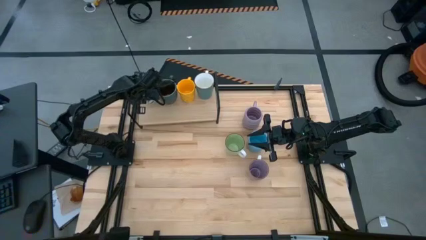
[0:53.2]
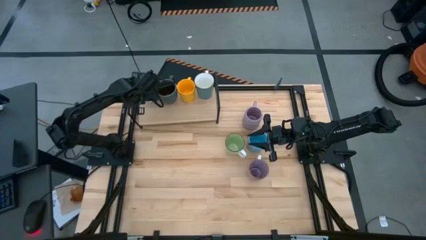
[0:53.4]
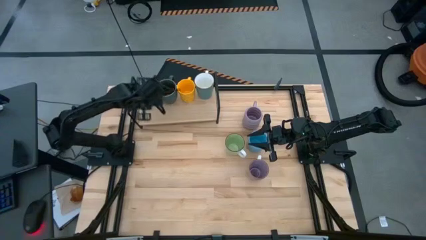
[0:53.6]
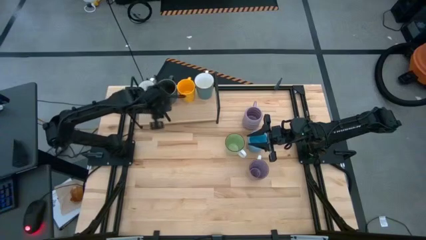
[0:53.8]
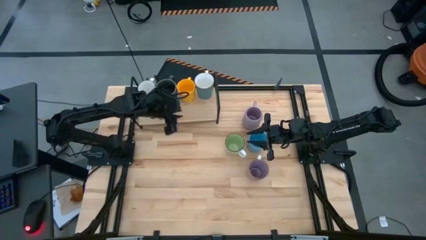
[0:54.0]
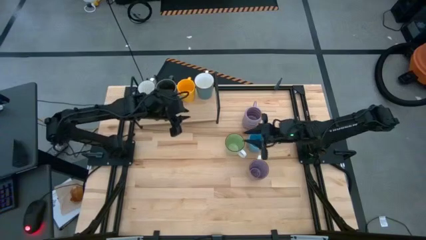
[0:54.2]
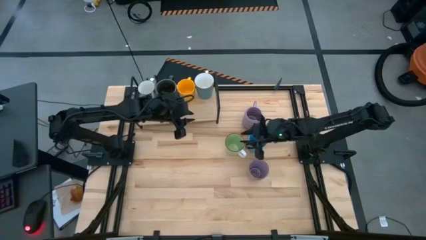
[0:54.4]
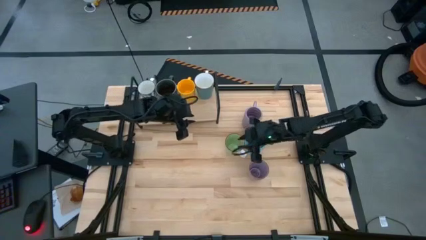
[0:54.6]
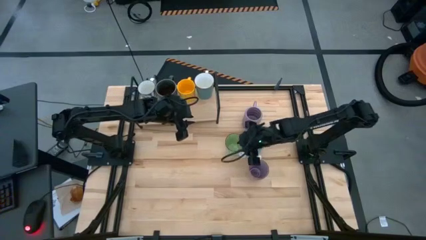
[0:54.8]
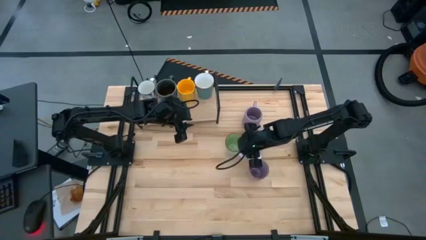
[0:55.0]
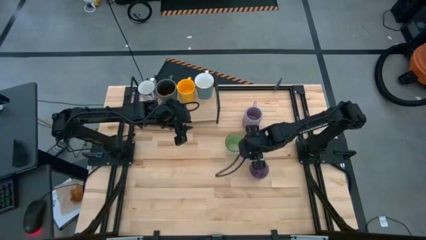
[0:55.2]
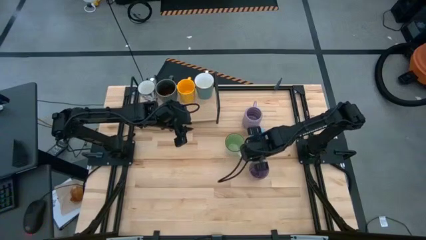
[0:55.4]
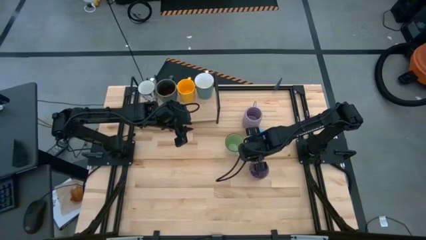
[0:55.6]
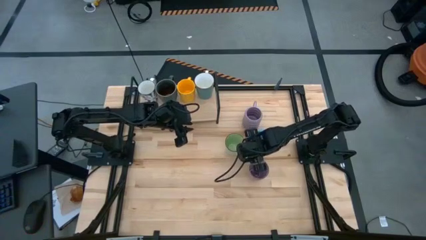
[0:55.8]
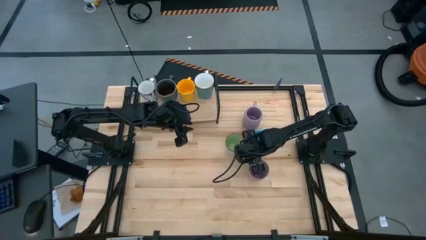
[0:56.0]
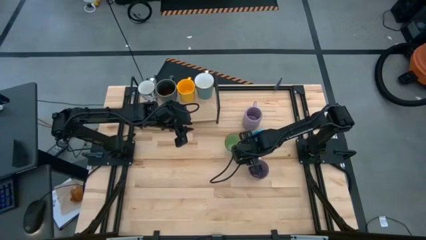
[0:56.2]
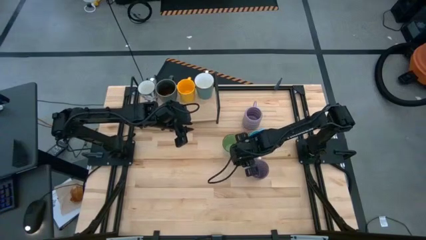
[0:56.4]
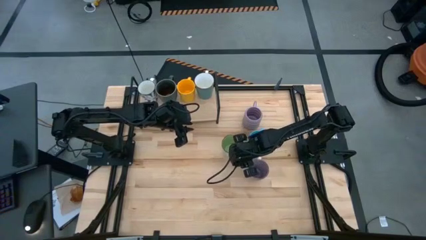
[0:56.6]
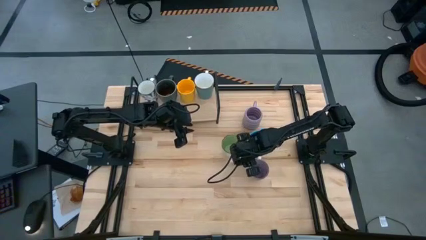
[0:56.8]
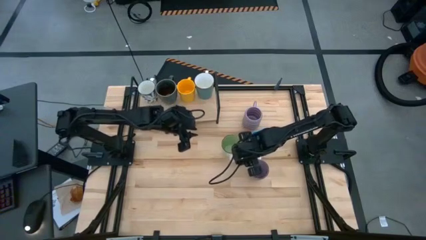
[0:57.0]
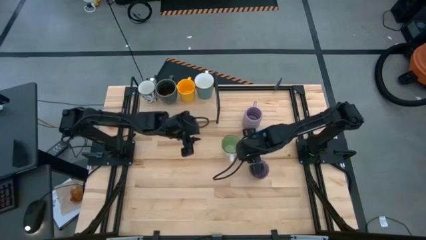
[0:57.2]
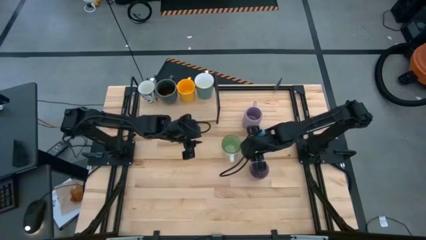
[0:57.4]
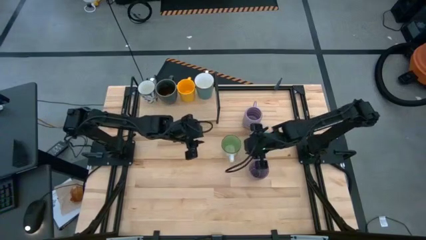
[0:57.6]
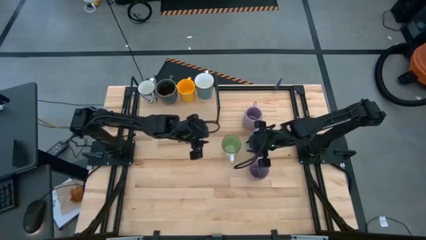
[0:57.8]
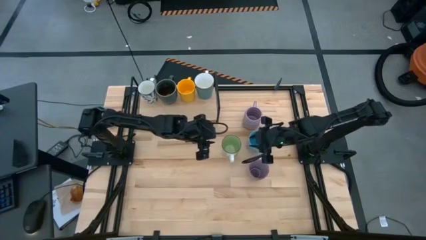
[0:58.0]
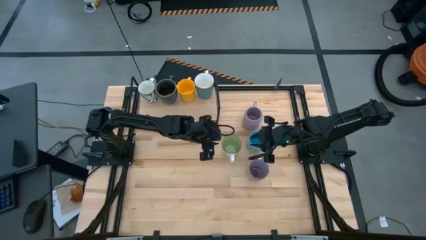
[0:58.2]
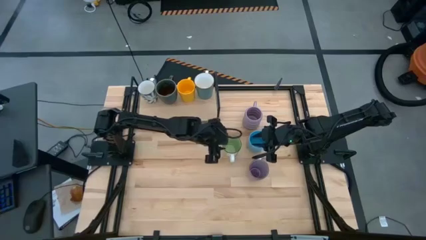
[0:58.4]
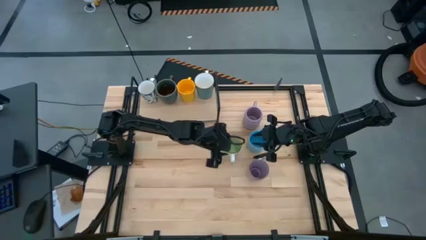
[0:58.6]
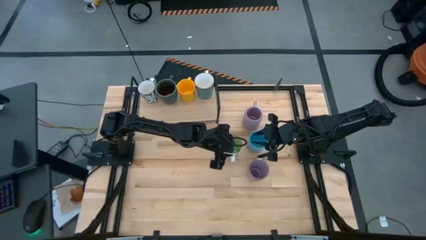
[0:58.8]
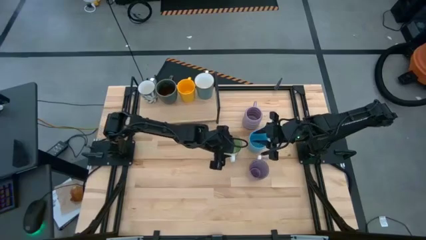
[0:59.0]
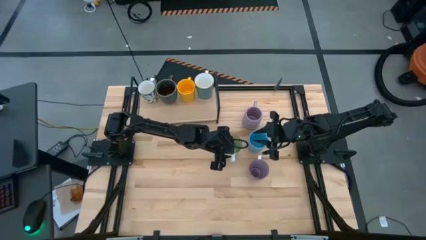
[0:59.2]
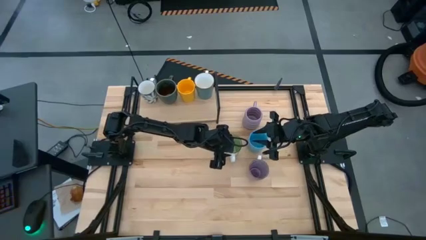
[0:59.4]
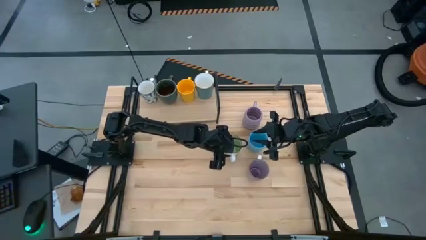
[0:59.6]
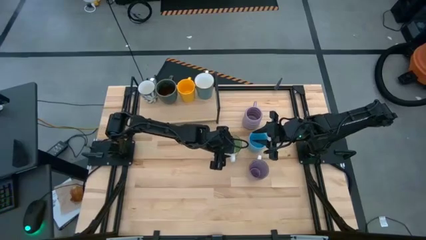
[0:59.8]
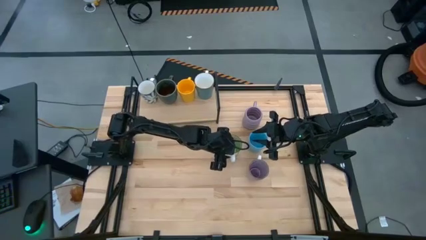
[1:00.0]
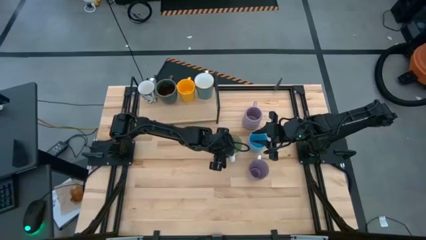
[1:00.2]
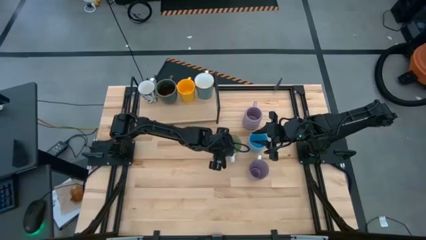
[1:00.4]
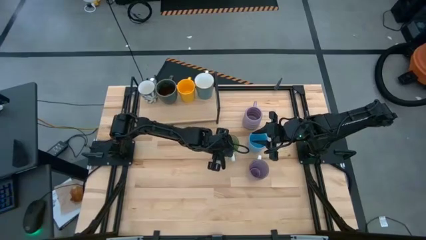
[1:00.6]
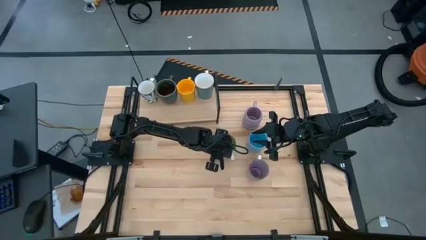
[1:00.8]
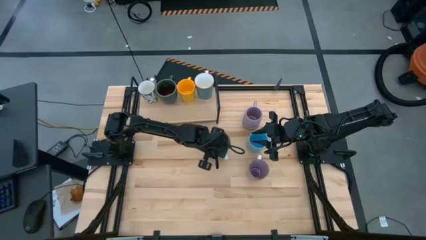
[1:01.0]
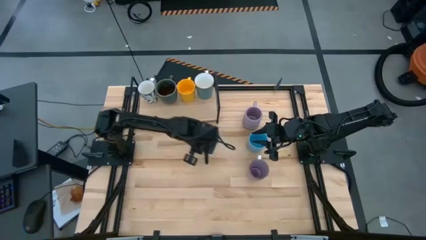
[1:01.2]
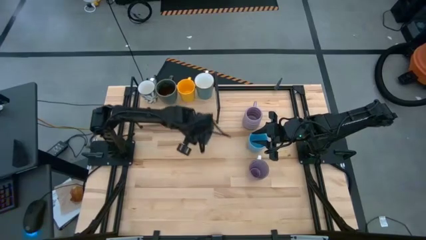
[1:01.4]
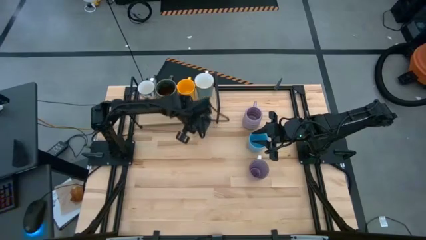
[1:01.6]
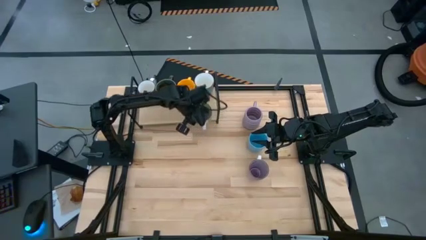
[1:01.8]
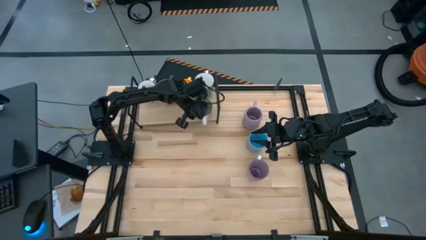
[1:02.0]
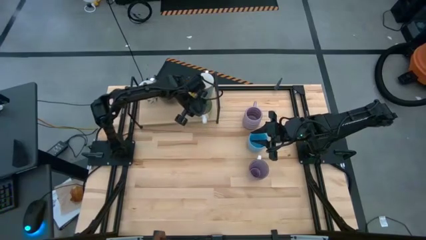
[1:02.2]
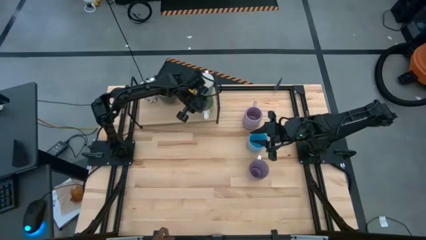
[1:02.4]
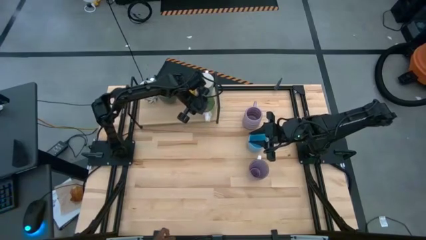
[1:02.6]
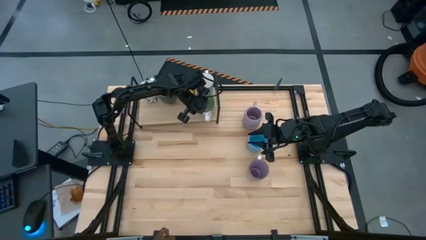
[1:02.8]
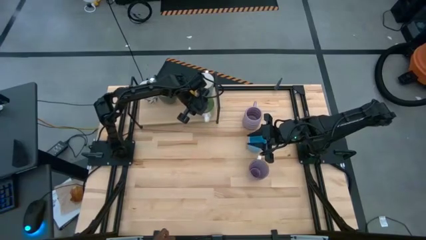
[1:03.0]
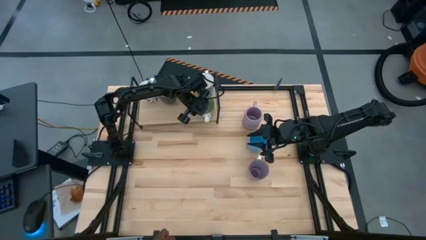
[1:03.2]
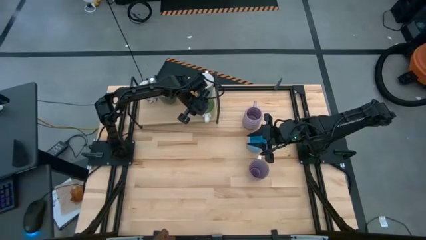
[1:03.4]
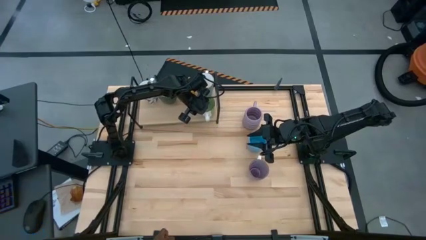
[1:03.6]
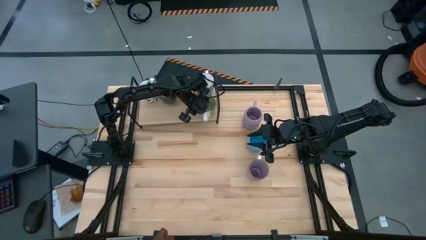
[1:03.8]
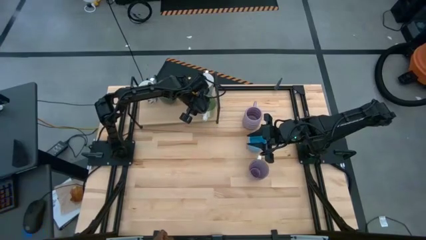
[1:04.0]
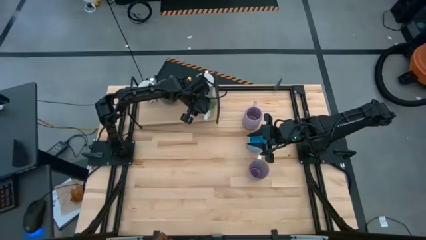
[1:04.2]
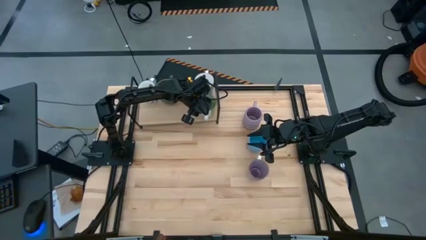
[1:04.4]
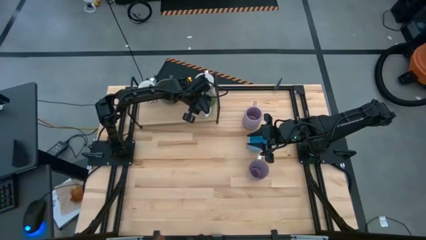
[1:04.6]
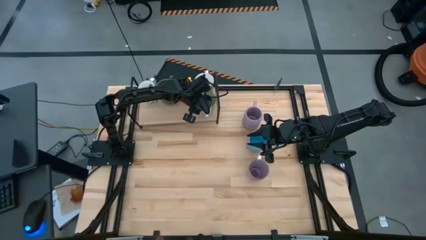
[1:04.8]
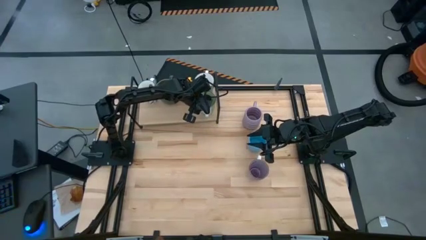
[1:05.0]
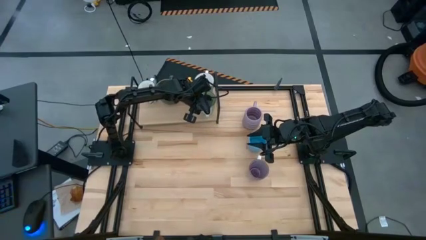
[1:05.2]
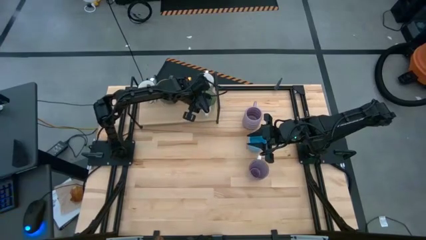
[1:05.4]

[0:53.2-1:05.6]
Task: Place coffee mugs
Put the green mug on the shelf
